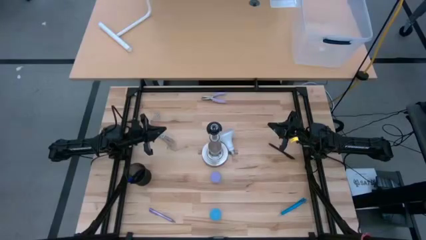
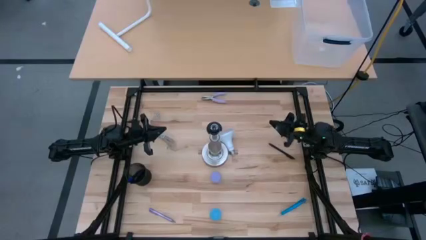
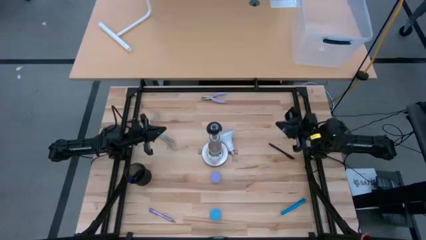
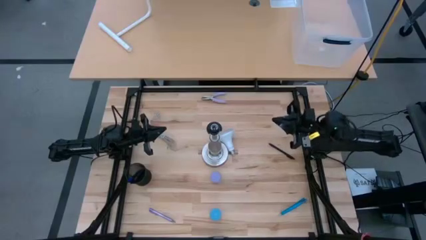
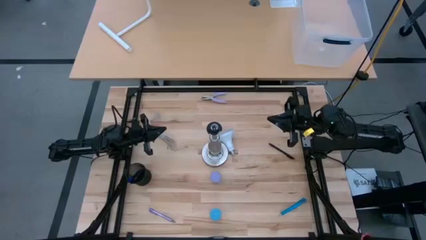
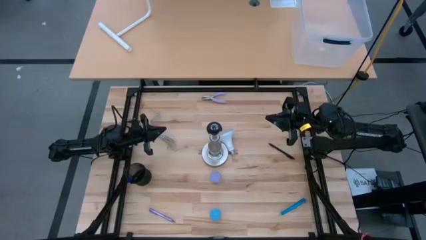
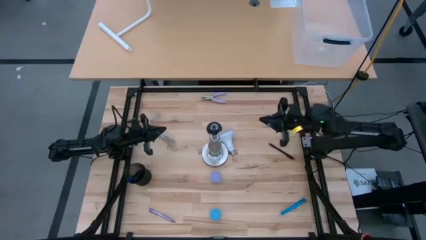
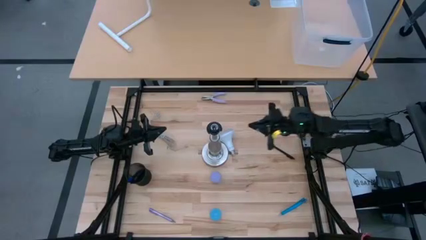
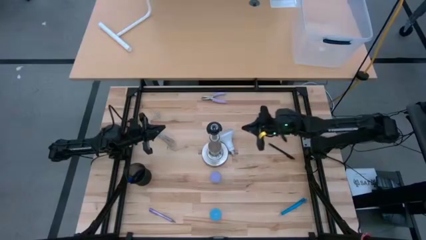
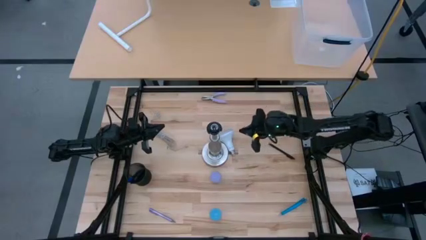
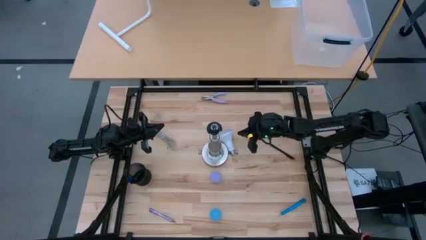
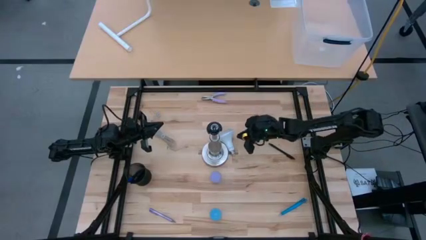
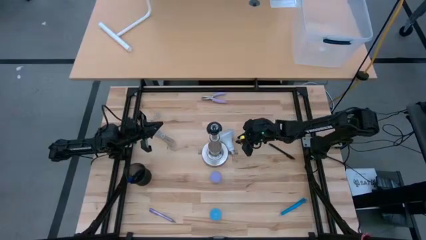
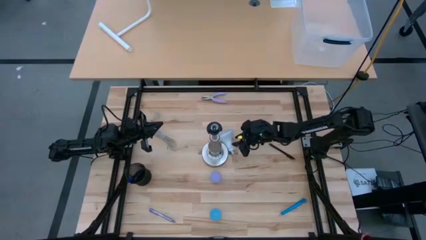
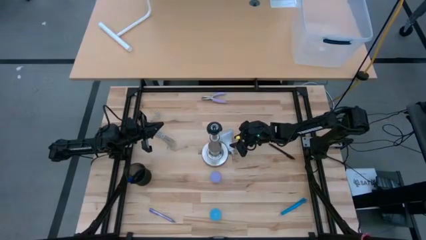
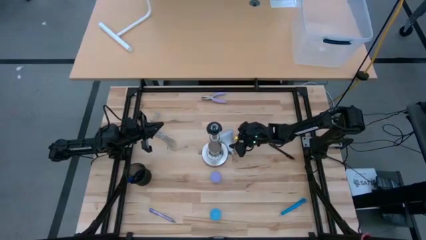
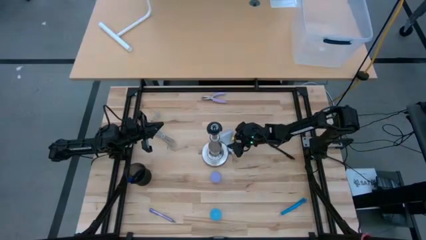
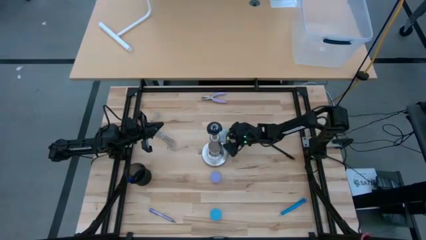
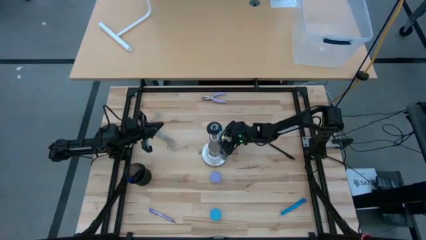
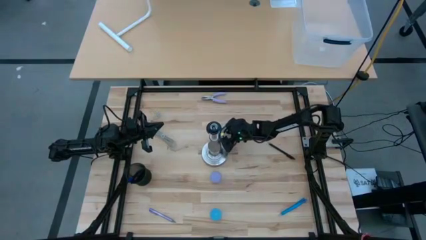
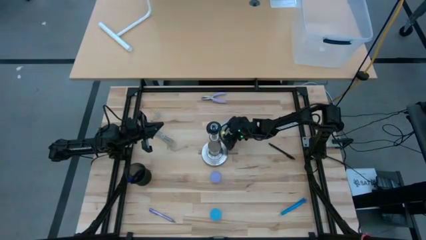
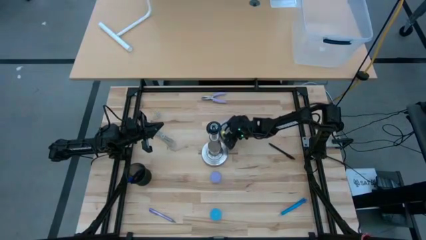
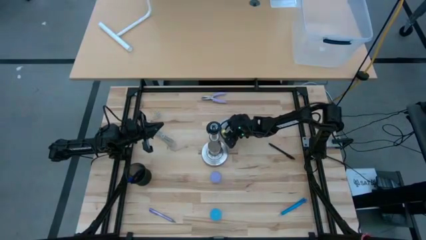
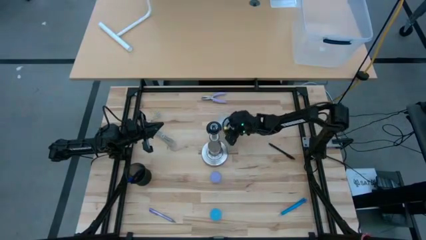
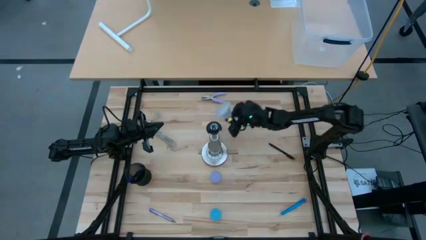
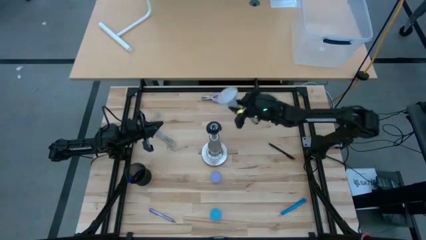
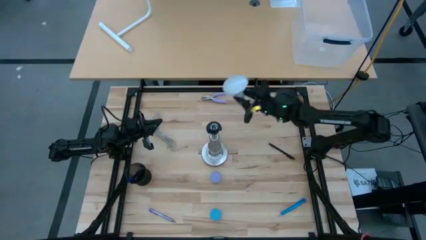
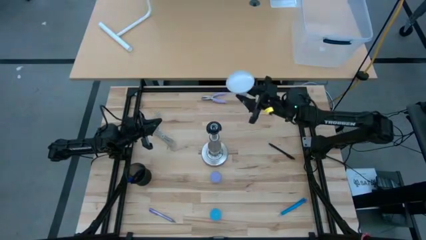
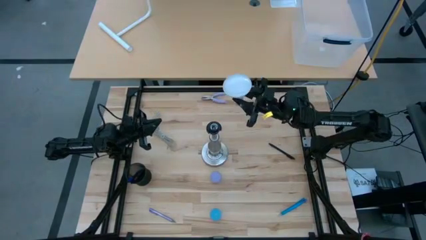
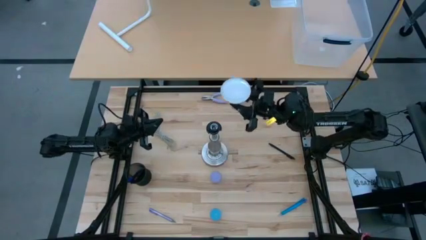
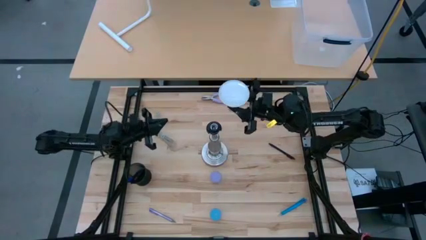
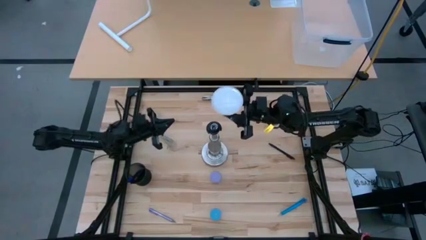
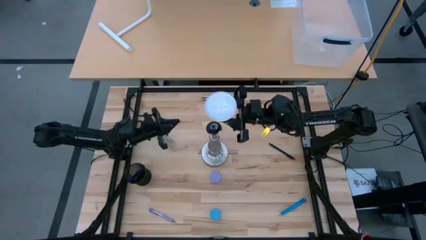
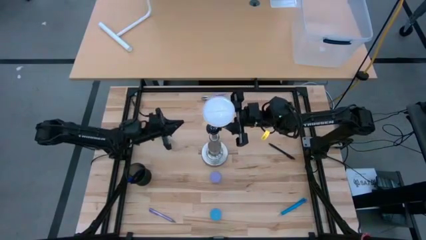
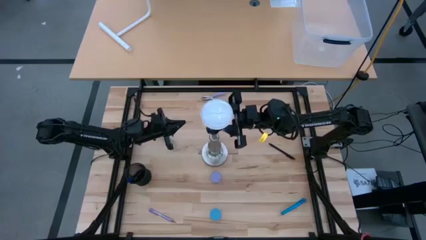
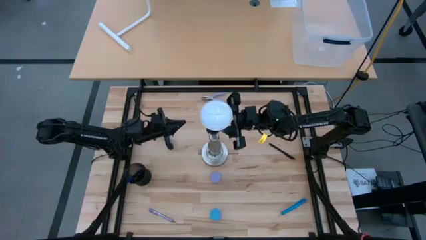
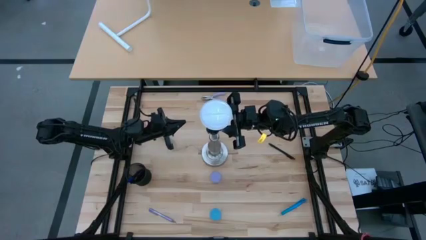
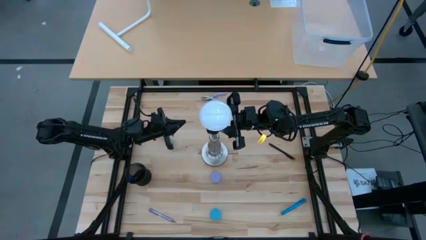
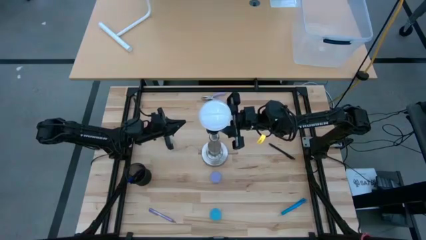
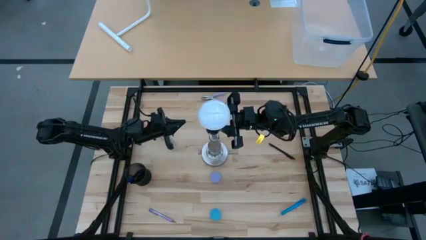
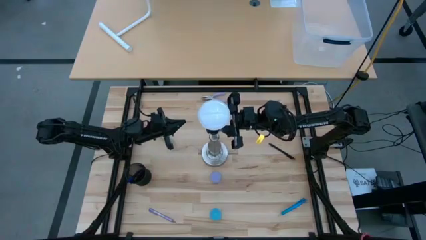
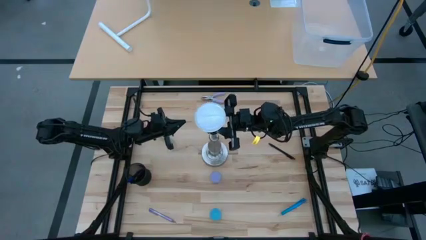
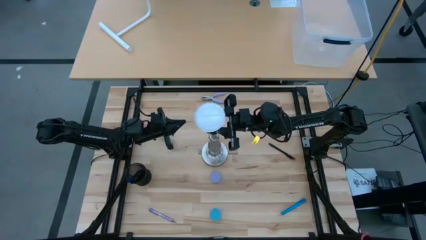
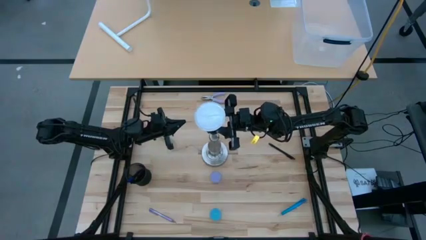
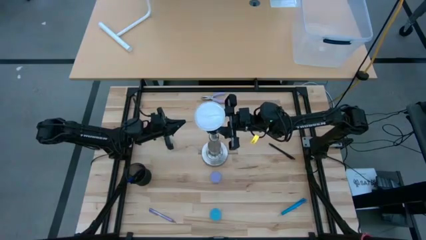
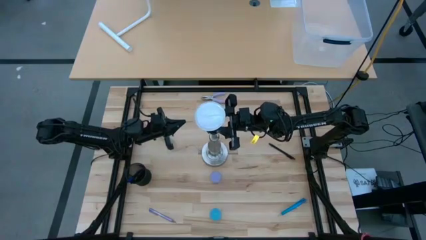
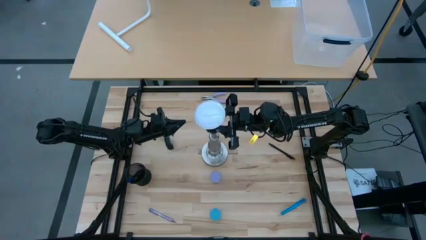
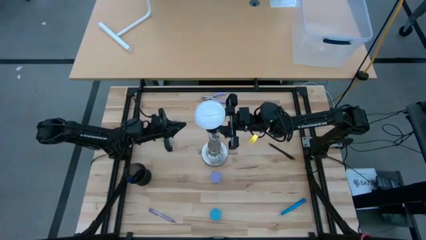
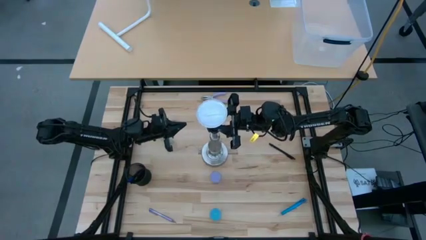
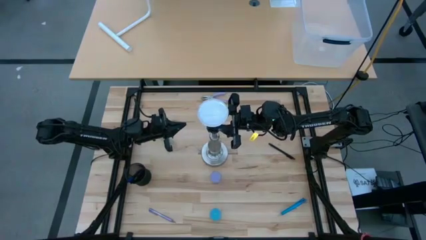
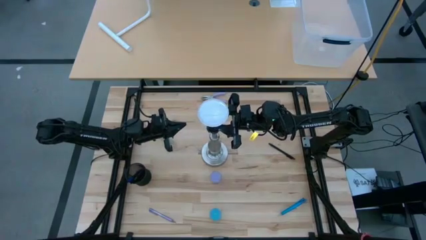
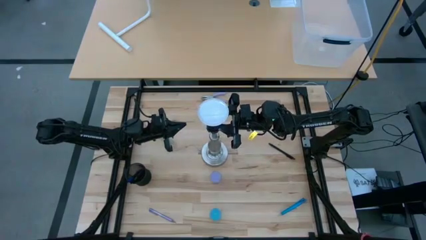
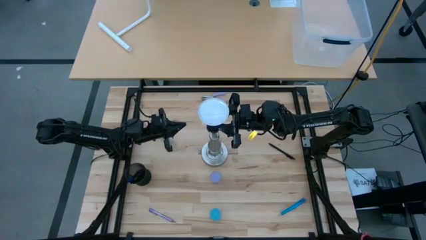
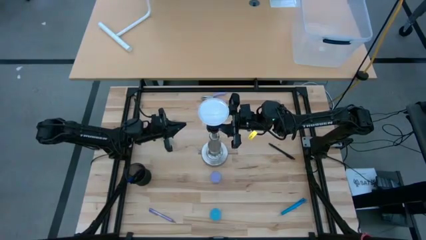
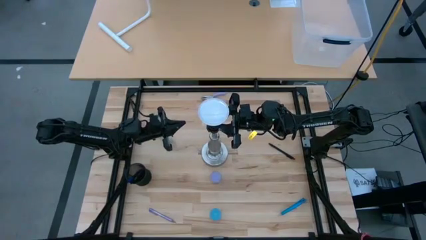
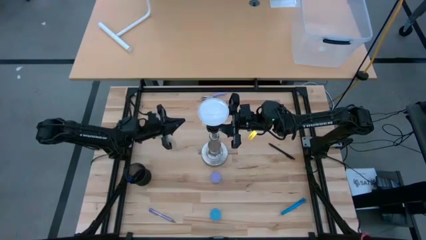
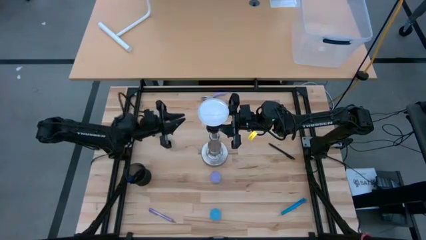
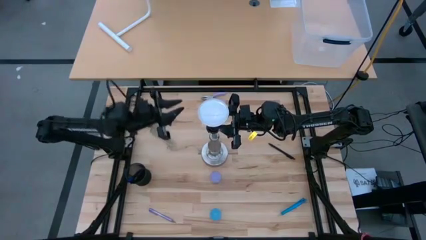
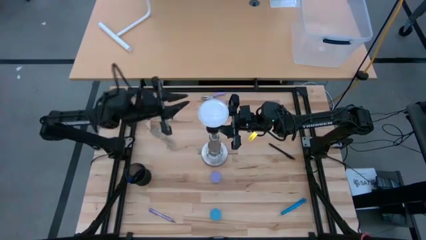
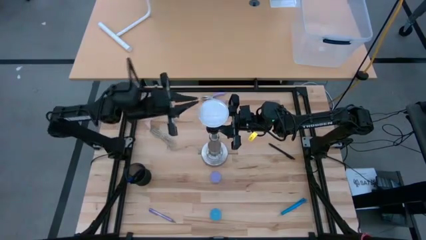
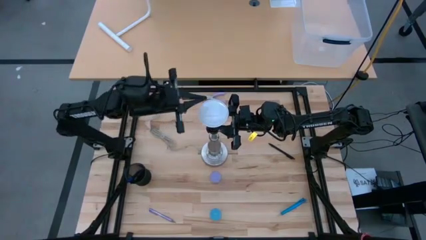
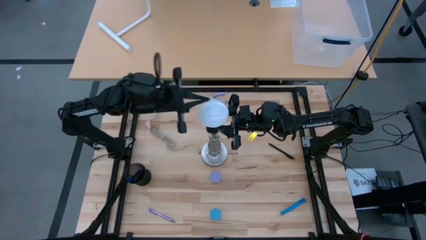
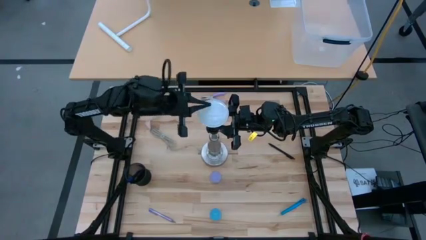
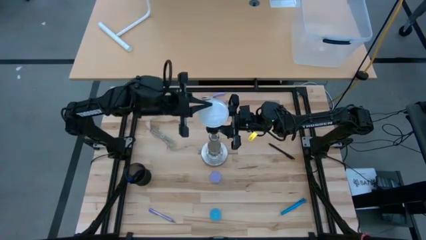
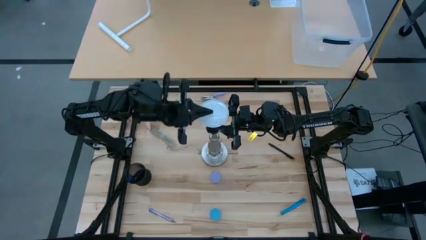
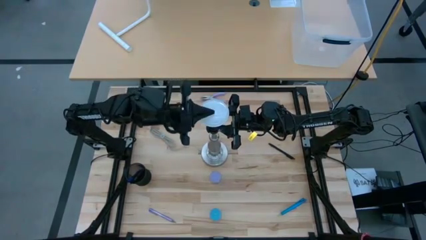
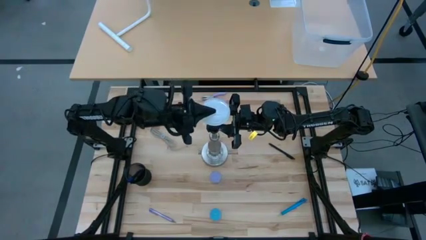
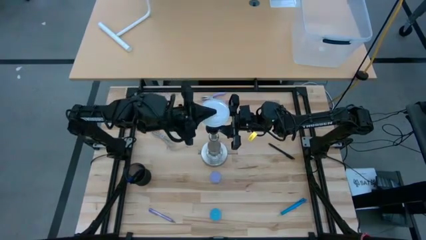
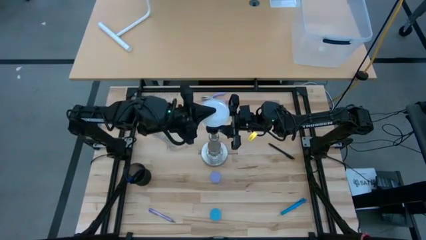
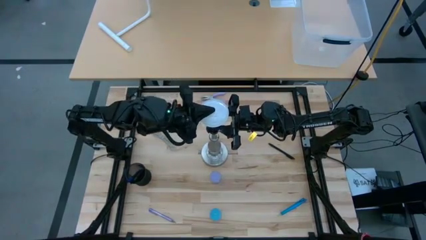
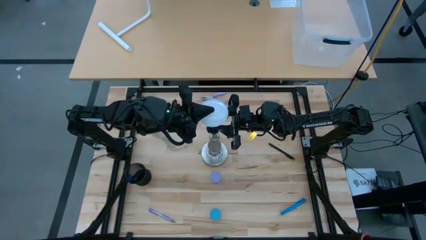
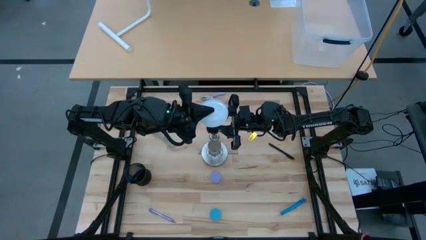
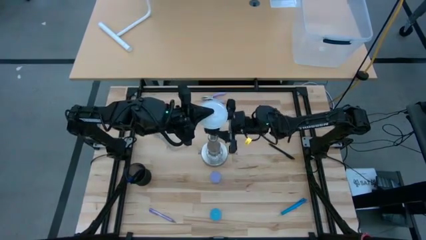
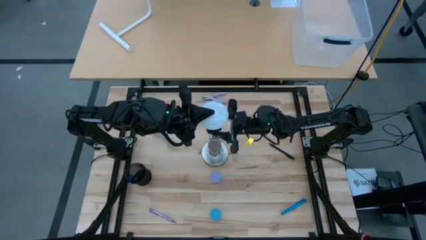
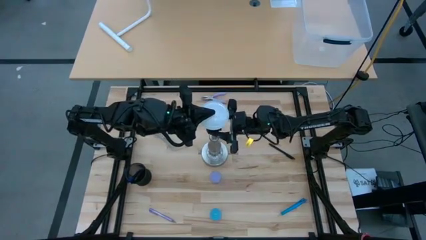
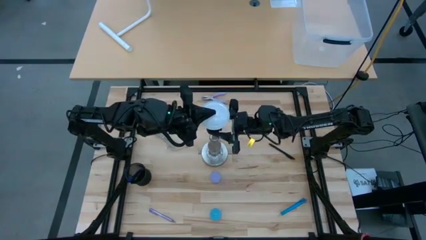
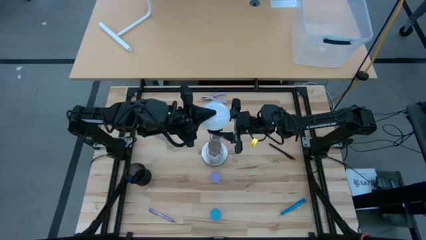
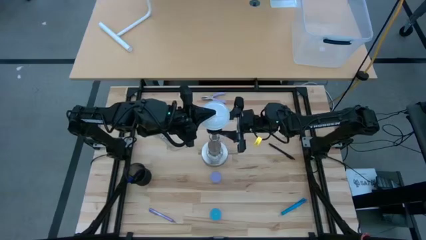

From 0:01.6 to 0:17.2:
Task: Screw lightbulb
Insert the lightbulb into the silver lamp socket
